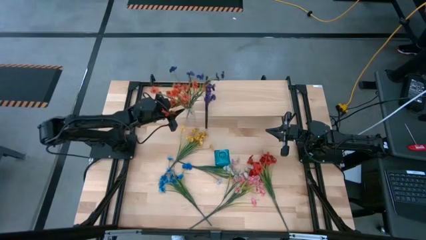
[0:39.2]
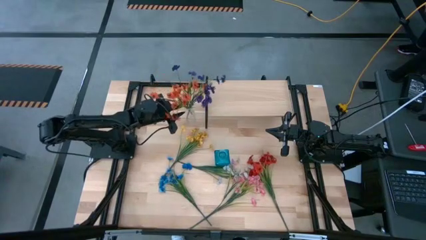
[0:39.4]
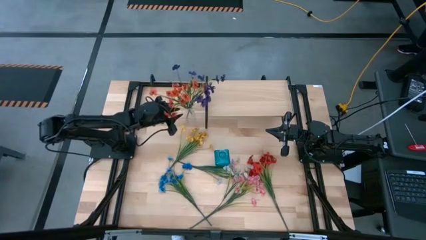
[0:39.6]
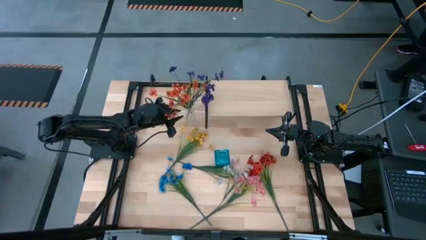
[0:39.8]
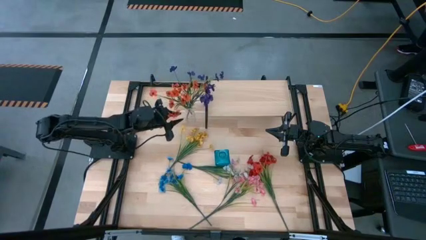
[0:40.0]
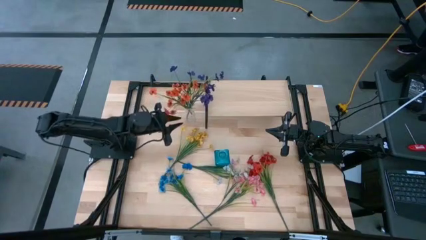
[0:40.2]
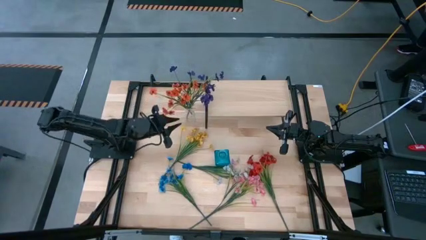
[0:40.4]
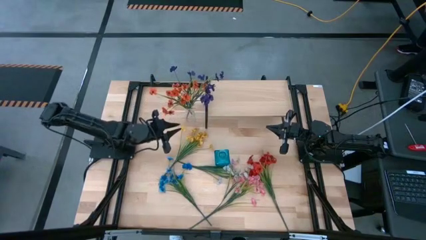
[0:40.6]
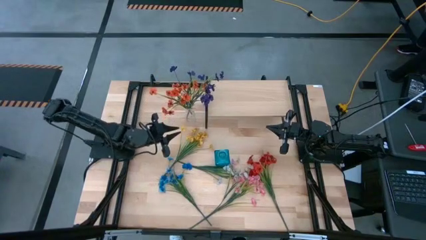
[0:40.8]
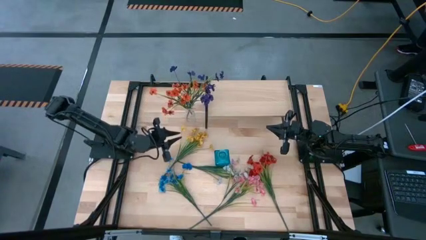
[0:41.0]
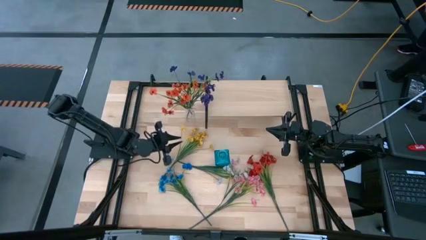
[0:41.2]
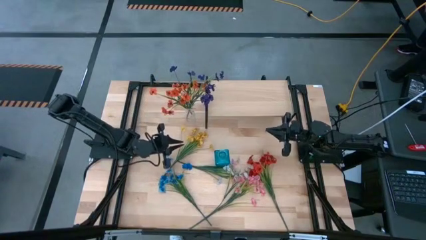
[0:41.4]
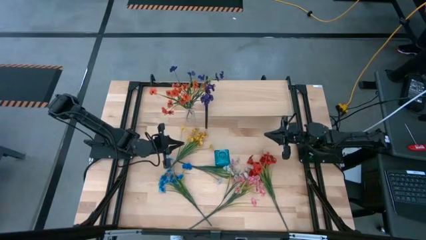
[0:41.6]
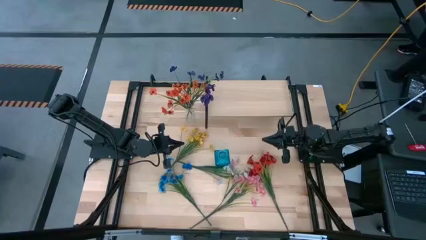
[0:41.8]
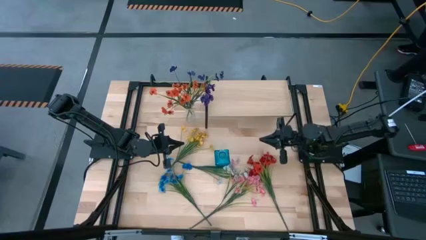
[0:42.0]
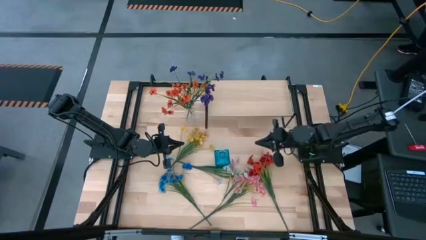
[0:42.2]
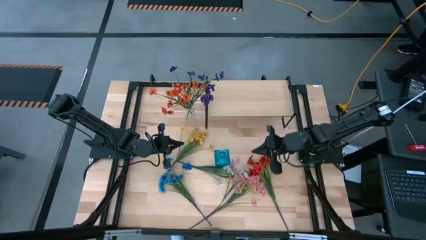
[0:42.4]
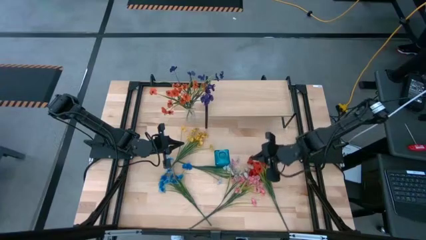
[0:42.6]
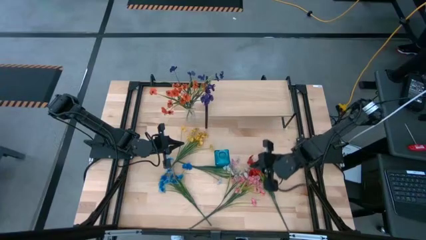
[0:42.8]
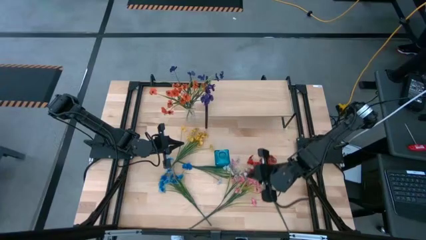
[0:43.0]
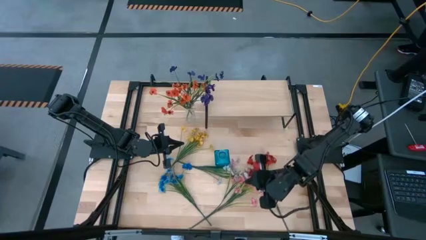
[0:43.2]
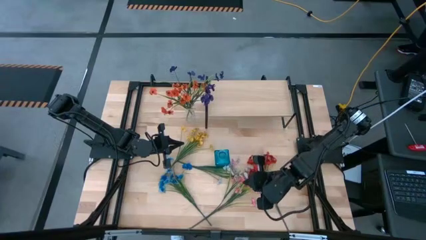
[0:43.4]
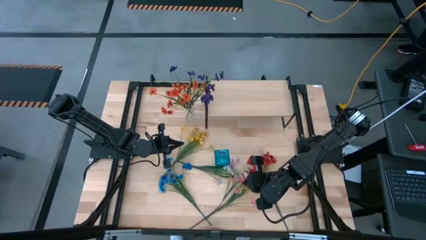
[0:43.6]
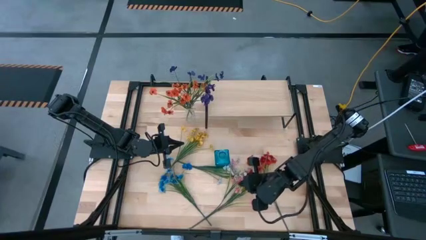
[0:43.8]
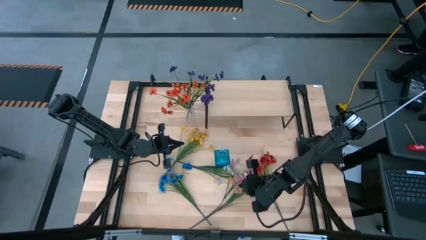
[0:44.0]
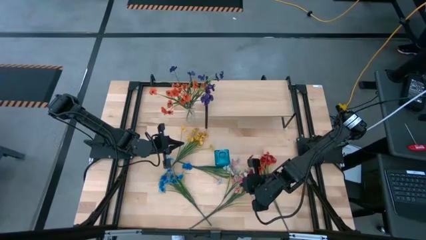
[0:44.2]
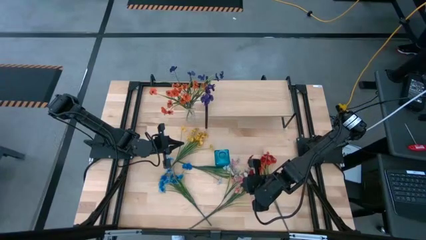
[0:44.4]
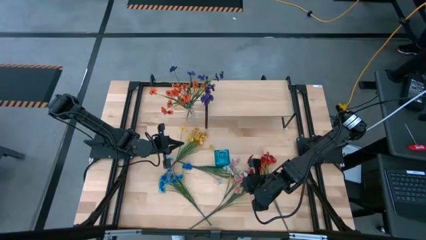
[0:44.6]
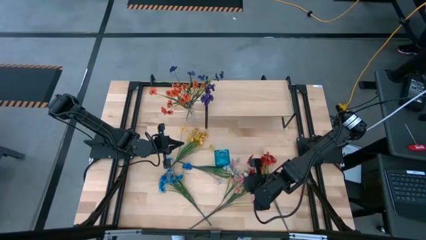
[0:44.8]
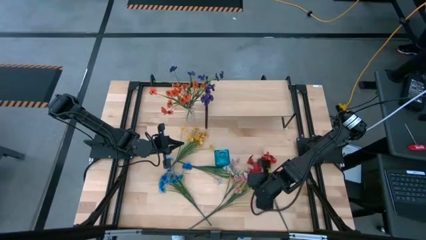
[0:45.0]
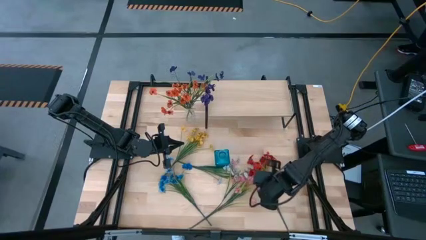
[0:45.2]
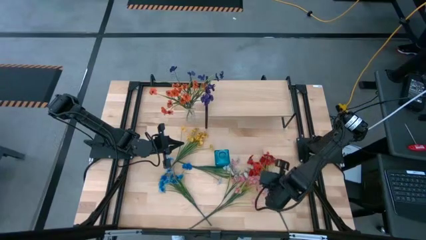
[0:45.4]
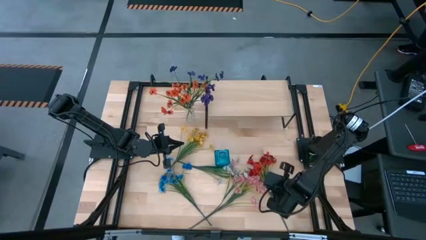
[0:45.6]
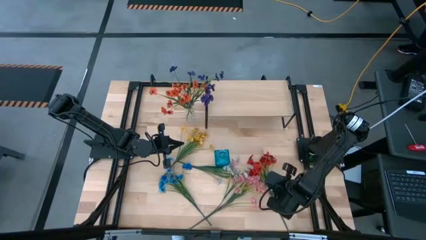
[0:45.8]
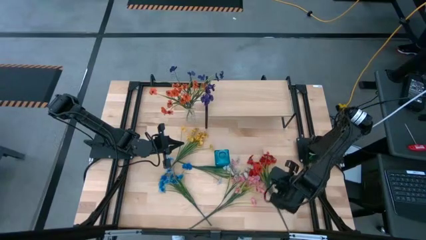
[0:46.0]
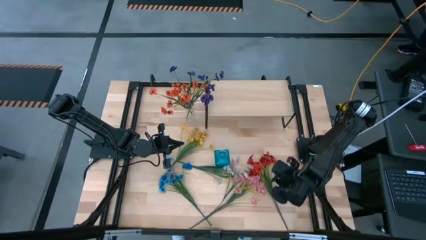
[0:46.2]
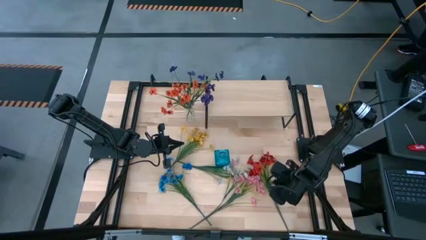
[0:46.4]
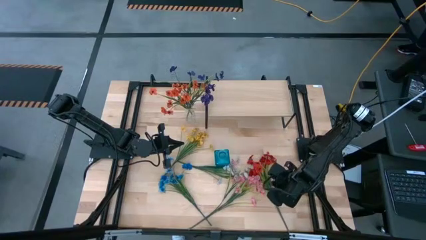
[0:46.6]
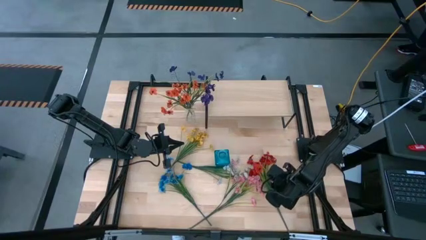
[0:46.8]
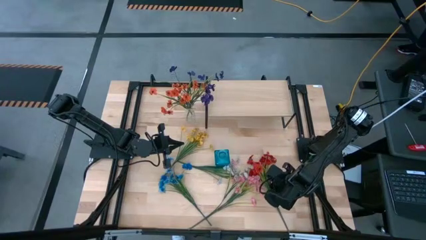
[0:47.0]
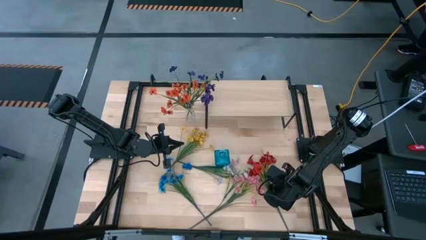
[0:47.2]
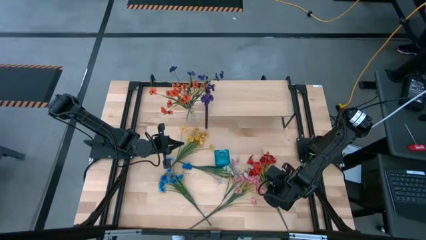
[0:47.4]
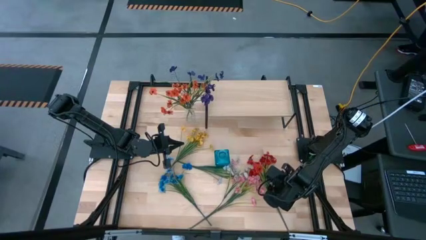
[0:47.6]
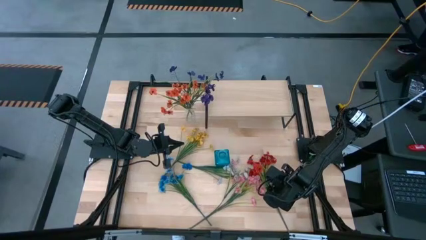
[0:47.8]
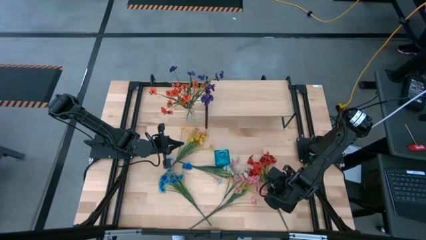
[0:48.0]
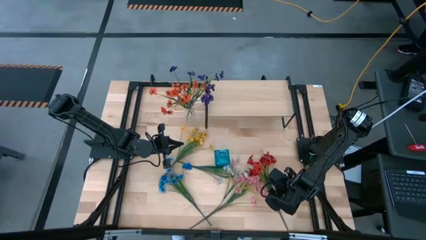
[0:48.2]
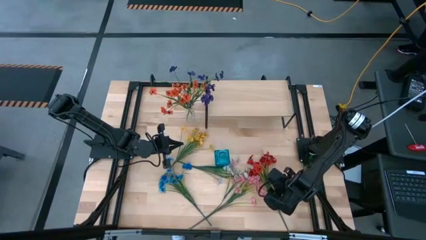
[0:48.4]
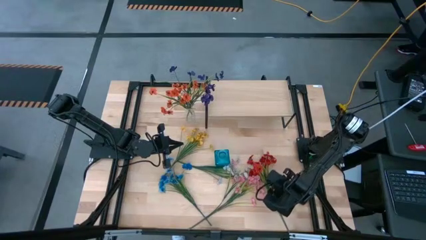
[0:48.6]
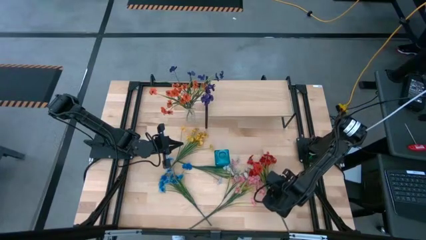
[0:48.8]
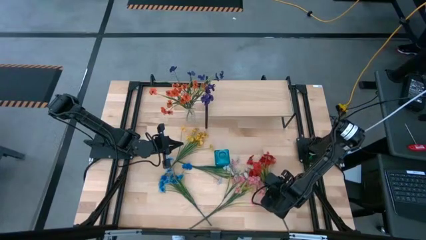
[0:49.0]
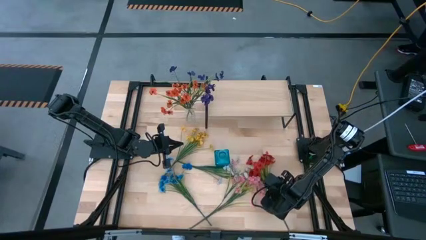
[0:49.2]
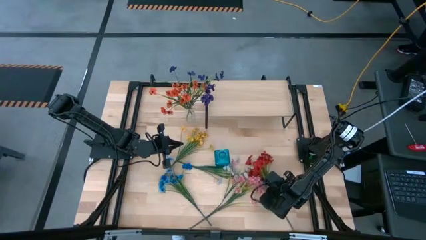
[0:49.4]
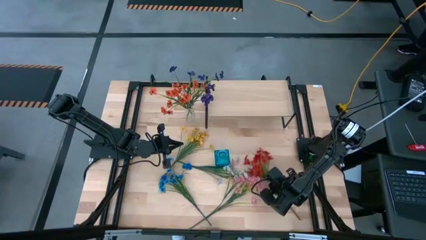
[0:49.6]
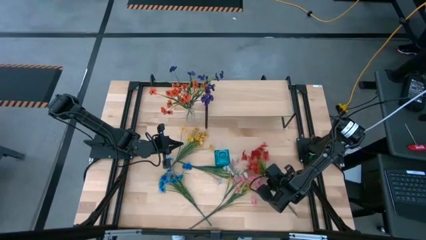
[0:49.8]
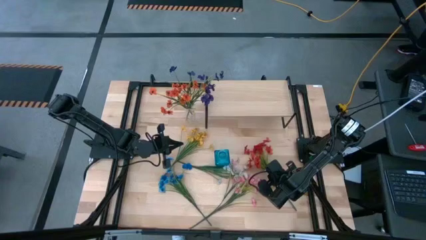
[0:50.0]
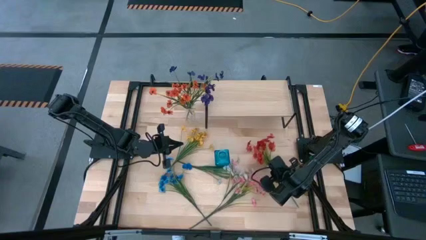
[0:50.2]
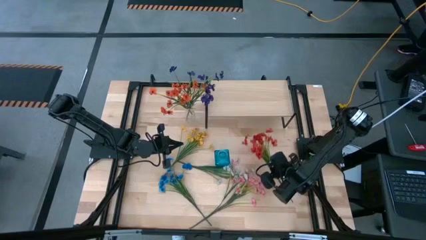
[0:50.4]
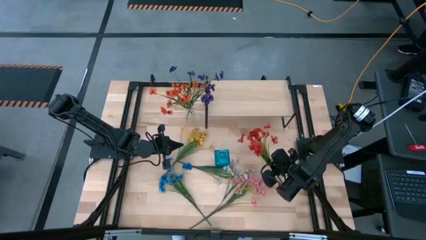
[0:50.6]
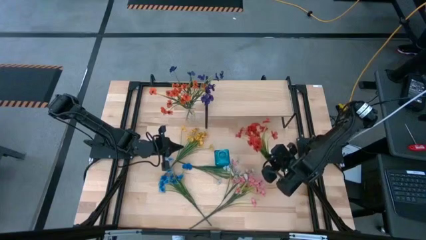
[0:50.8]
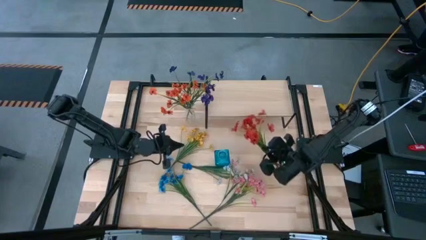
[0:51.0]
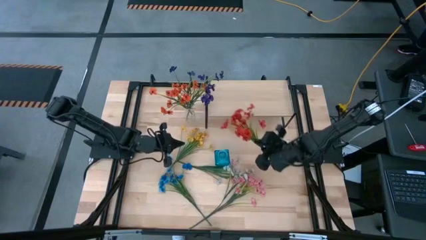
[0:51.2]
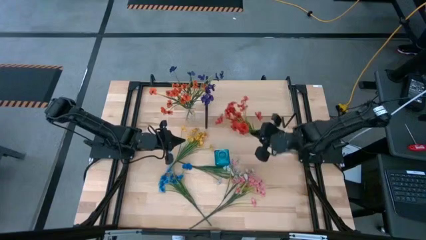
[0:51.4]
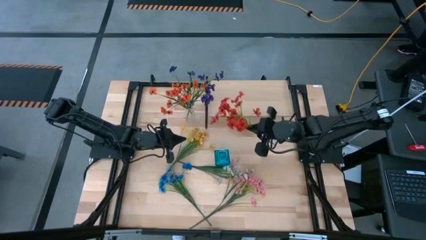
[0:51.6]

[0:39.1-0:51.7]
Task: Pick and place flowers into a vace then onto a shelf
Put the red flowers into the transparent vase
